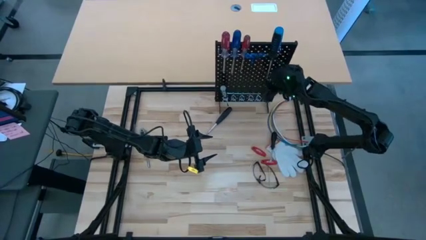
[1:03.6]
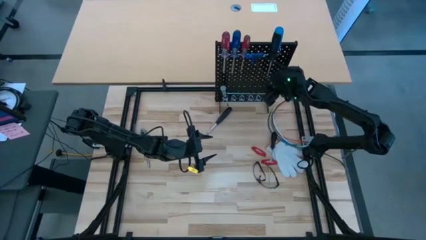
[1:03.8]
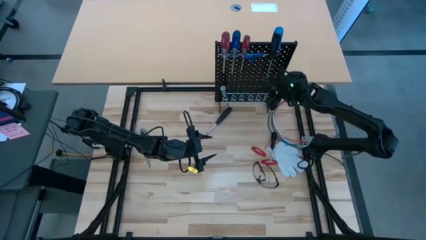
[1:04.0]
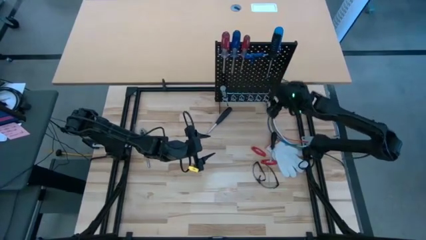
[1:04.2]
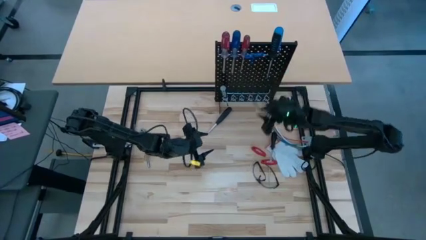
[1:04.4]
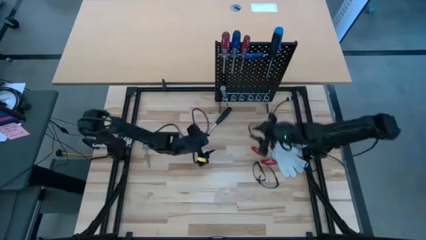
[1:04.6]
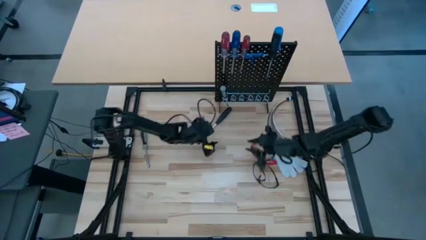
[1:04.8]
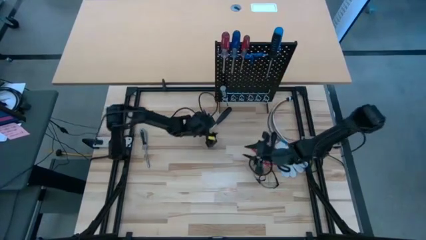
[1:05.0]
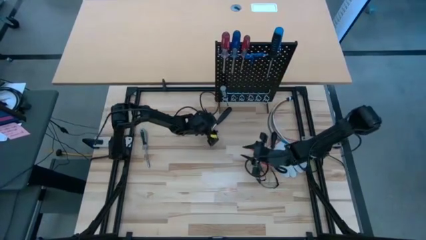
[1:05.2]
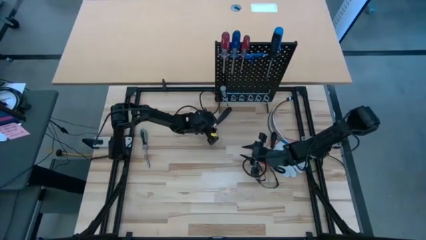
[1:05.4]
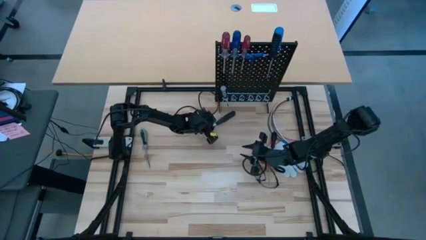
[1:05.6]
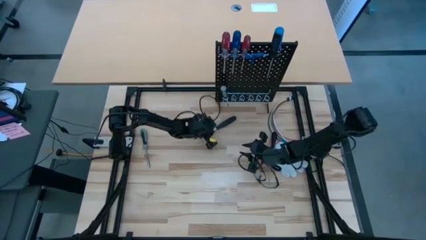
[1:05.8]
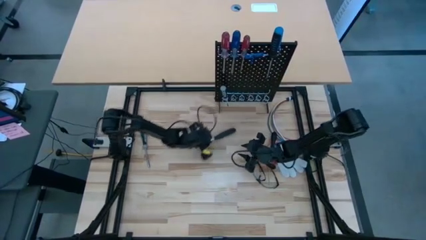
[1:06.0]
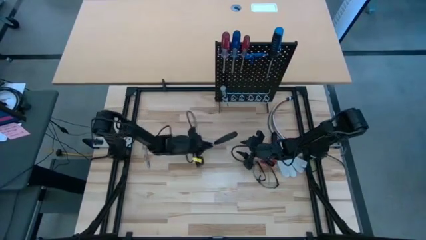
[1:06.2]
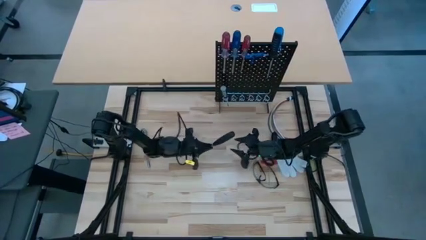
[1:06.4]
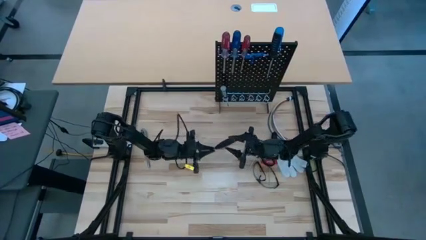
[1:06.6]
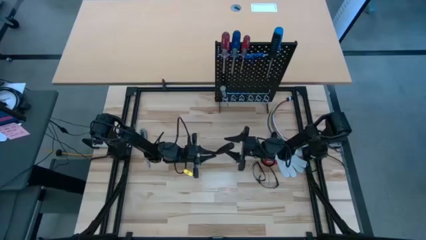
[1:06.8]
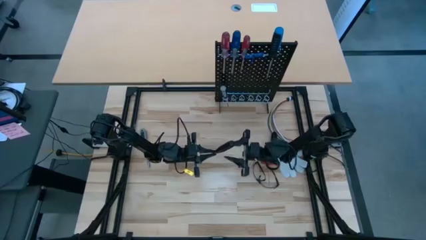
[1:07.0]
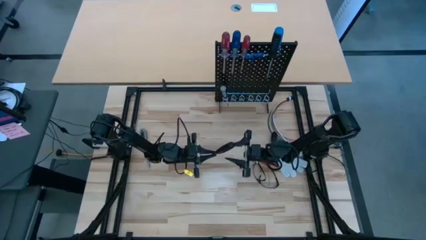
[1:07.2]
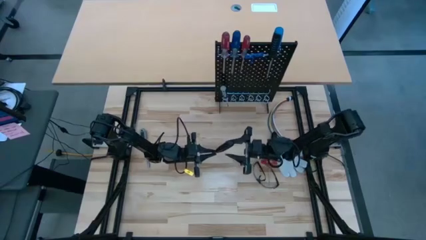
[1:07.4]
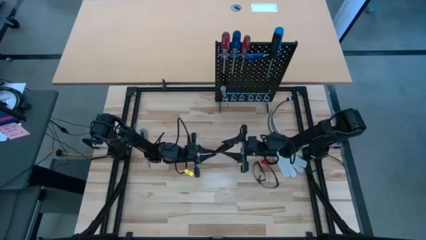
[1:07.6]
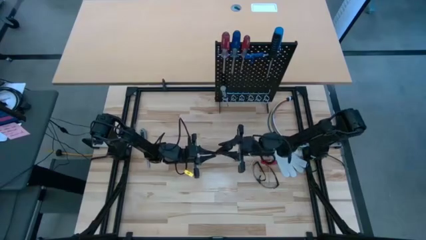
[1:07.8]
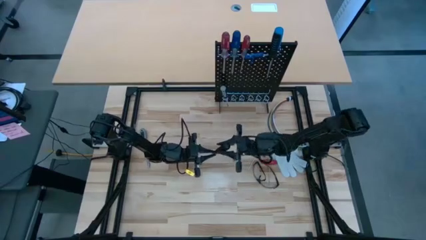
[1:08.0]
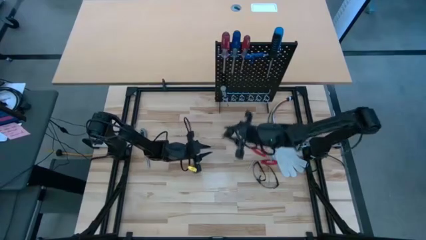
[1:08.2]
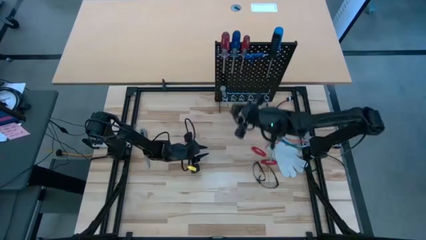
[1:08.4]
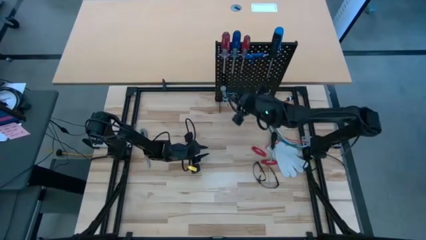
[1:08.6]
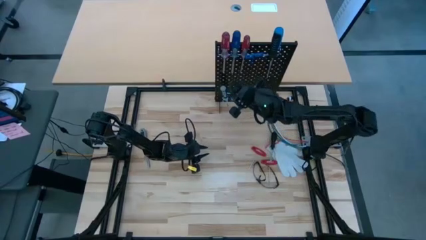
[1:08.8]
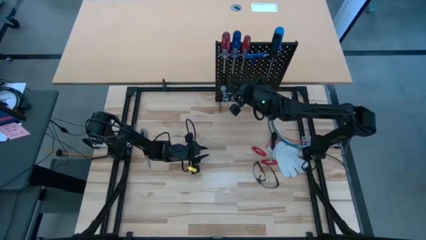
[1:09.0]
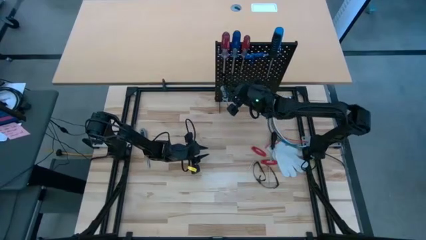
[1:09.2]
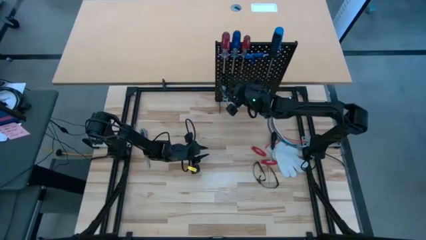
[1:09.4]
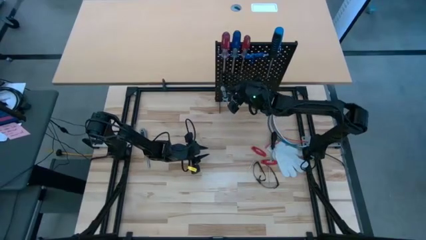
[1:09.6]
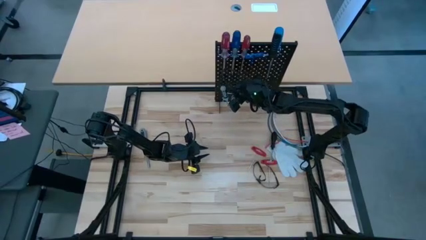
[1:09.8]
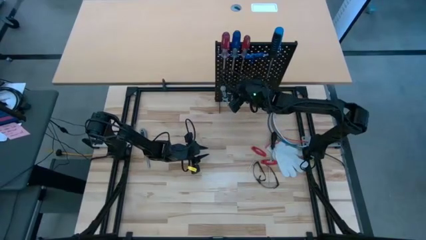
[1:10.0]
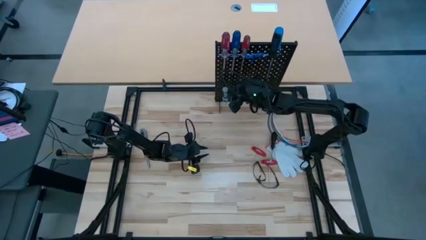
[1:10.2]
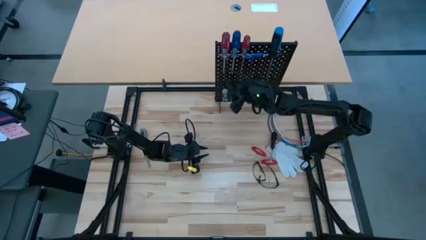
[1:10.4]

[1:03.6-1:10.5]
Task: Hang tools onto peg board
Hang the left nut driver on the pegboard

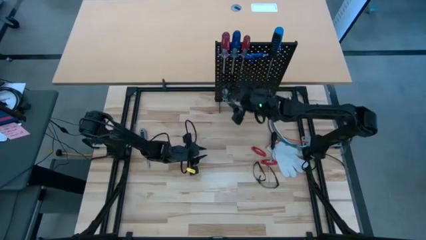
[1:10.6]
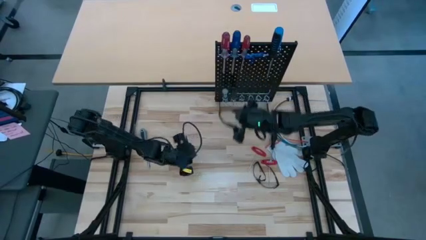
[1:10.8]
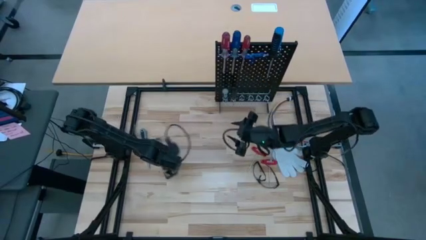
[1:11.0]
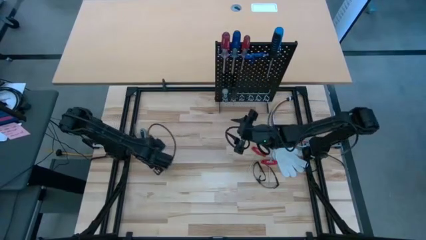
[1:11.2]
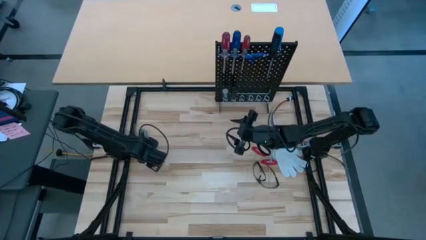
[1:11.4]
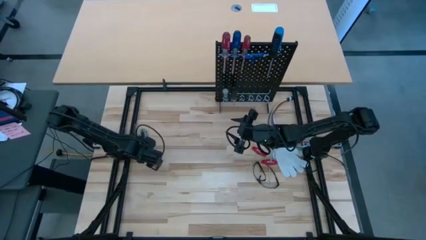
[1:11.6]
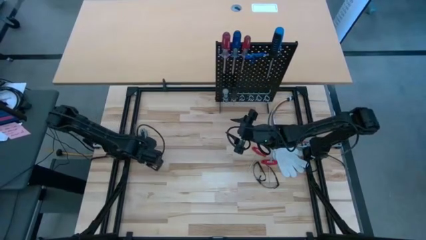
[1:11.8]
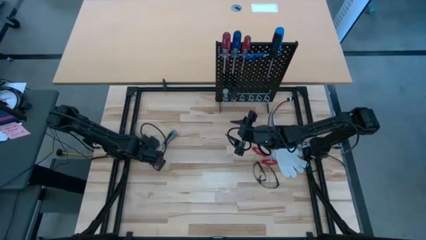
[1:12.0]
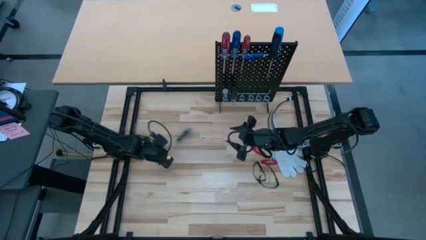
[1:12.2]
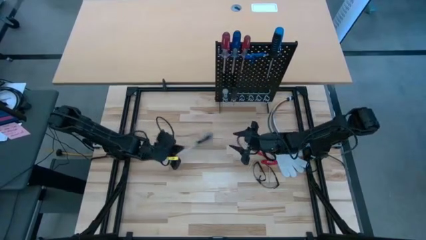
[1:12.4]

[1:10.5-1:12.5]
Hang the gray screwdriver on the pegboard

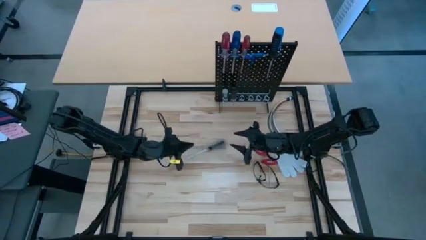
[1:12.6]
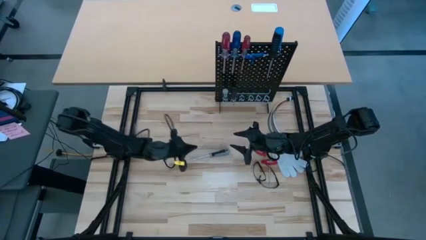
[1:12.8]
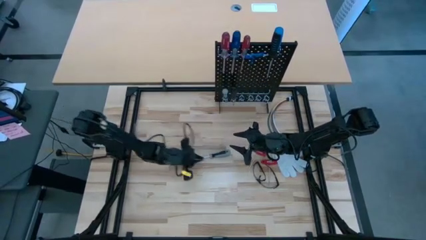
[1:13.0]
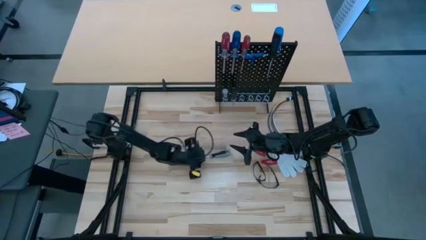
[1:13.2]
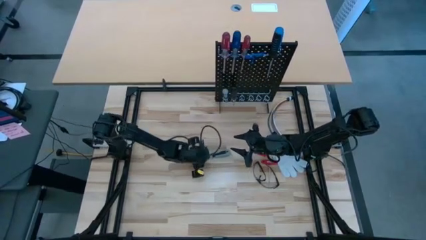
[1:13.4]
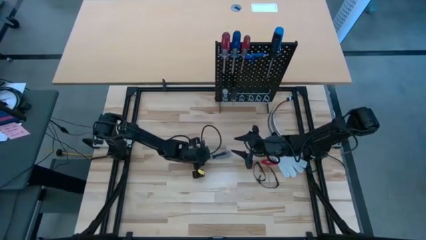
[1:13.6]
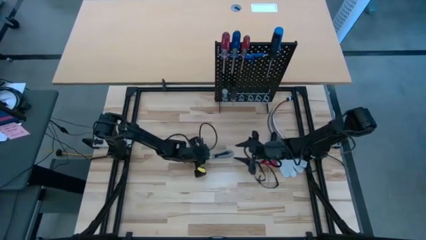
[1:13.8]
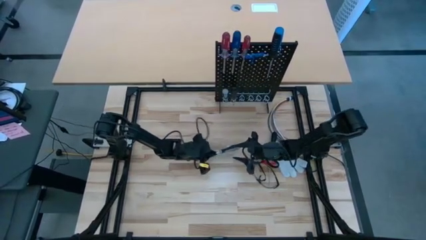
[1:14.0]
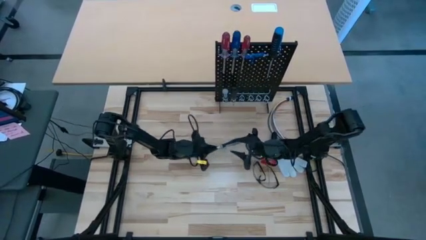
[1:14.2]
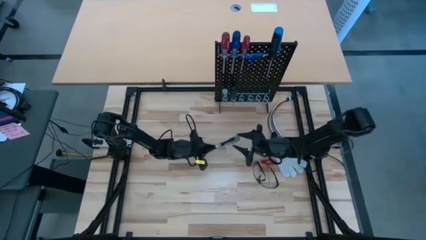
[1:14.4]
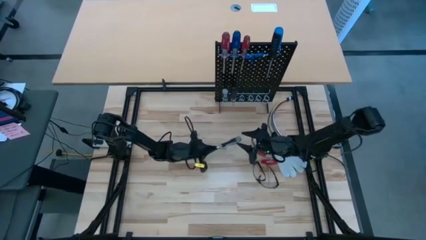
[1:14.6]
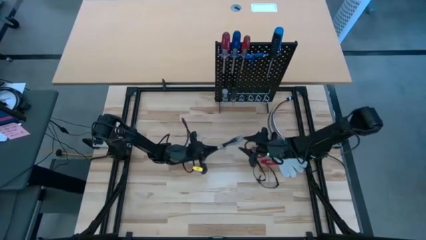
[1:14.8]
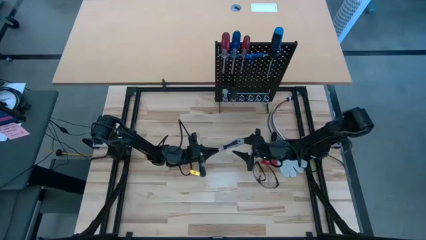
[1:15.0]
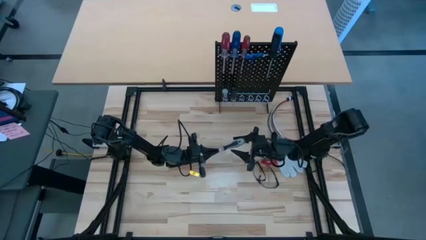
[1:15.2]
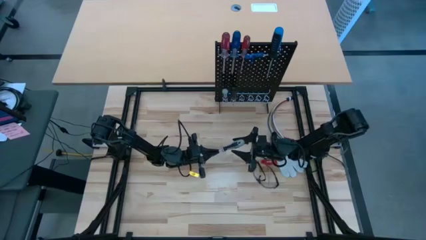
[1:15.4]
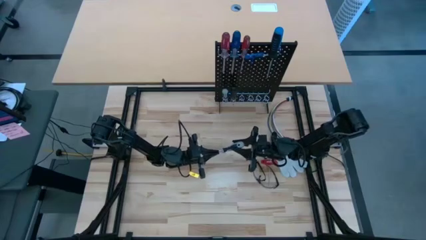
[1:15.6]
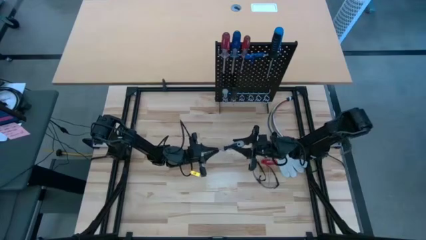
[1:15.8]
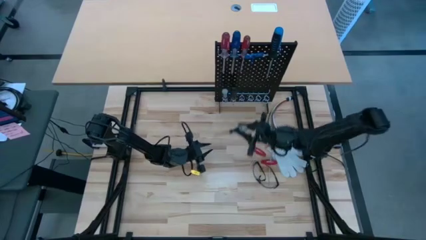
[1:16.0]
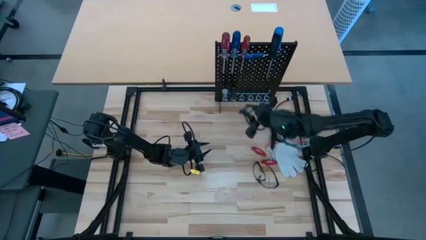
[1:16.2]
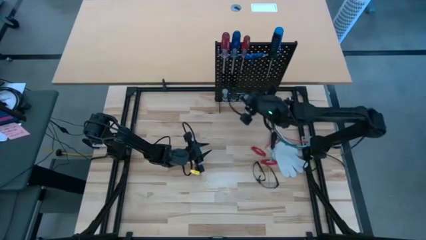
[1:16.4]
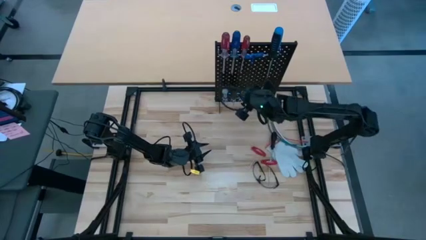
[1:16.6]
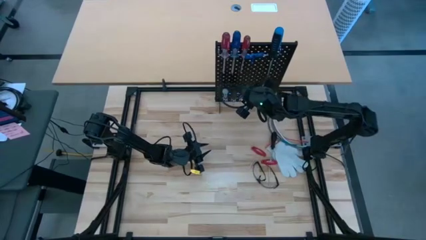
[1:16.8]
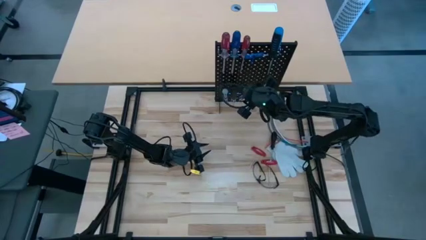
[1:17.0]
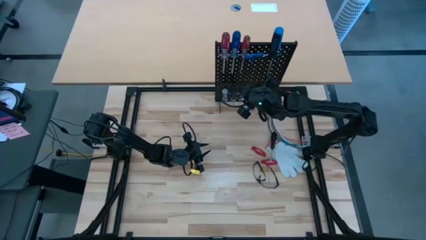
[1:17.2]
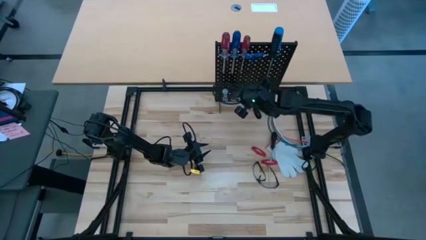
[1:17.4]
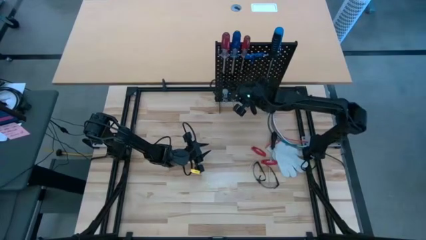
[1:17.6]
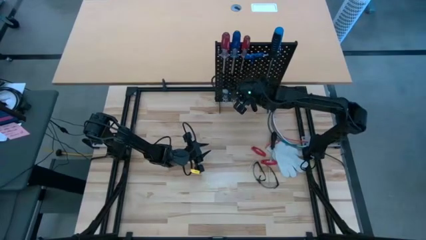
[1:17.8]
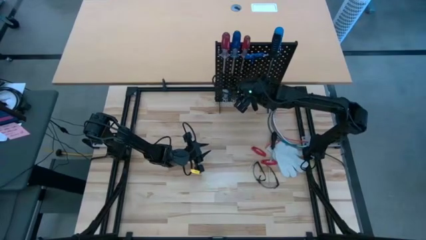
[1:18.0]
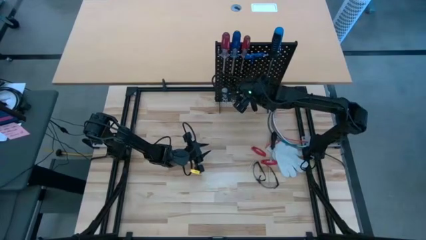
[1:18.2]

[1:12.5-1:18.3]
Hang the gray screwdriver on the pegboard

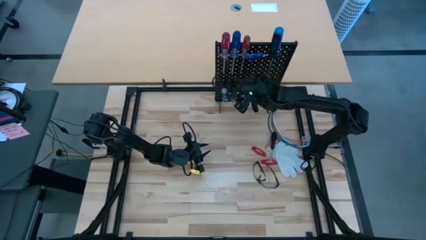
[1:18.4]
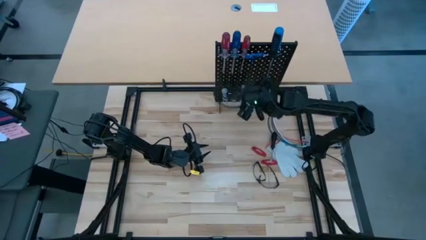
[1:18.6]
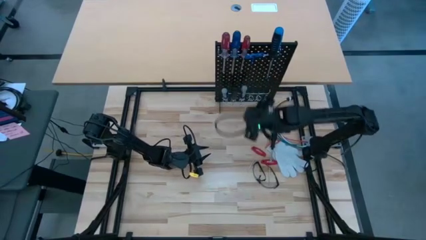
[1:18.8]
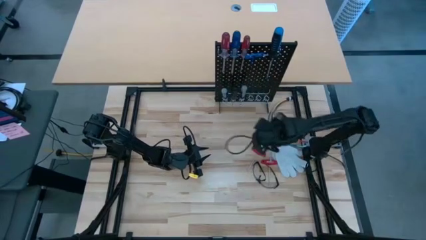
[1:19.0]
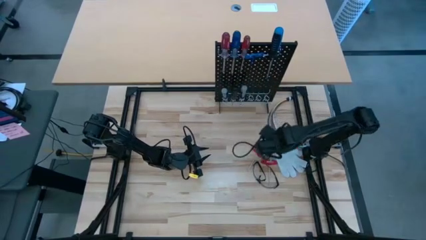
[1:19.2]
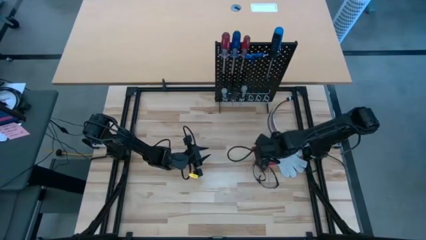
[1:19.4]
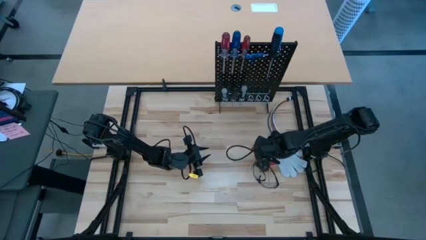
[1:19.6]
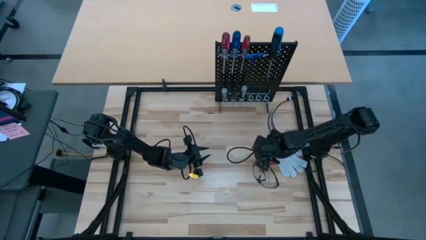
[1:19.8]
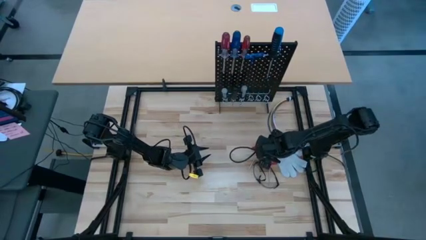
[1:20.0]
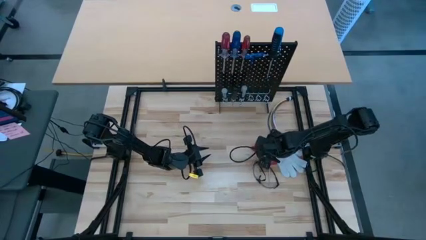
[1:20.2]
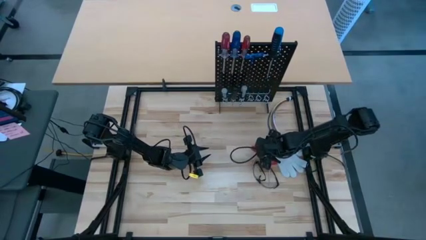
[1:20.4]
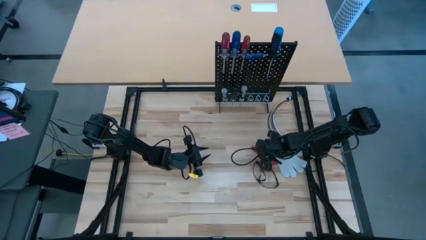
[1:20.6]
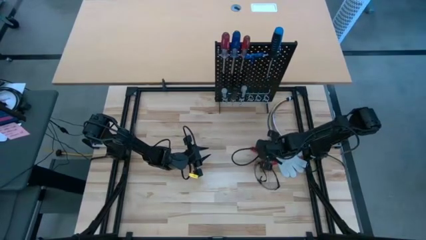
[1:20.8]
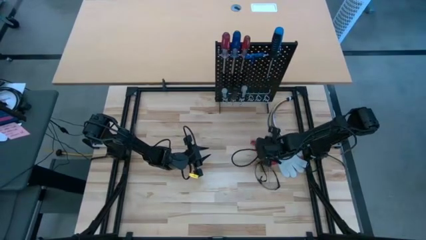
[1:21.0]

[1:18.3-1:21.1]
Hang the left red Allen wrench on the pegboard
